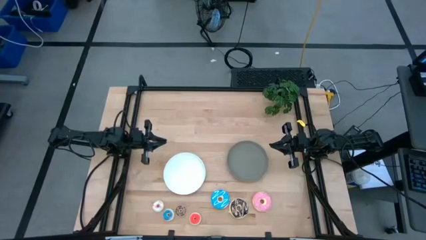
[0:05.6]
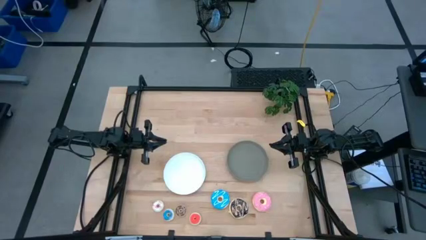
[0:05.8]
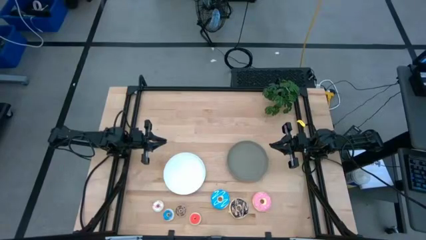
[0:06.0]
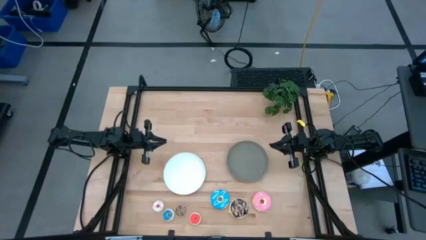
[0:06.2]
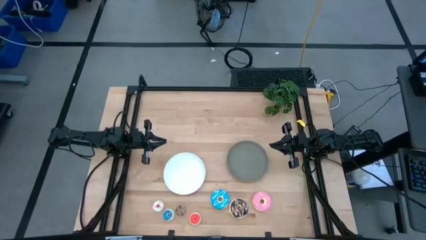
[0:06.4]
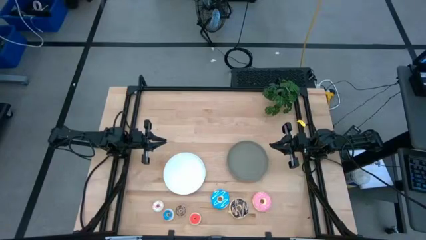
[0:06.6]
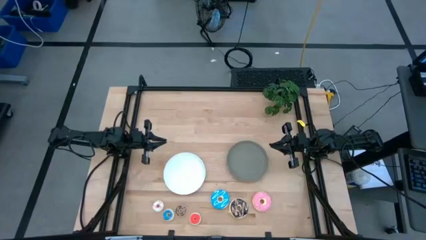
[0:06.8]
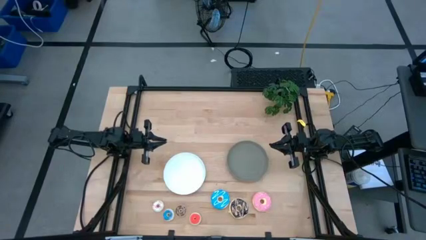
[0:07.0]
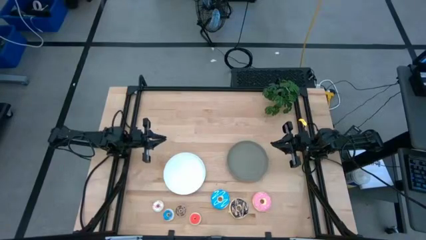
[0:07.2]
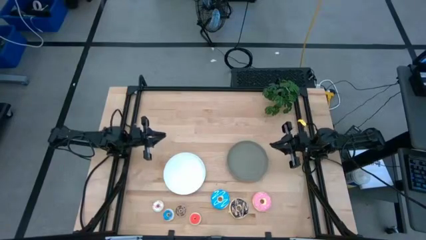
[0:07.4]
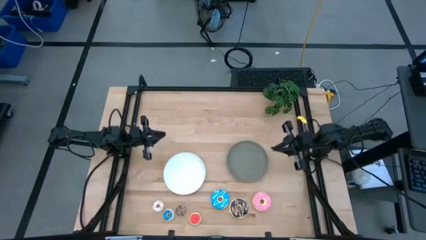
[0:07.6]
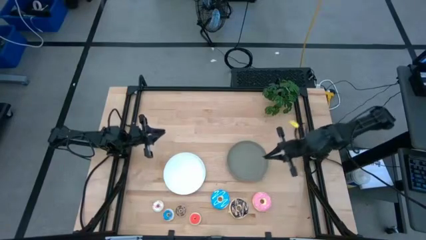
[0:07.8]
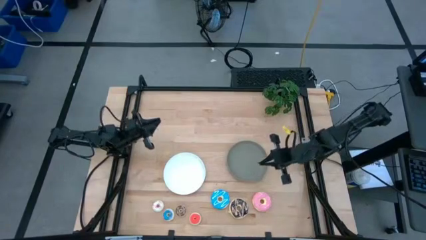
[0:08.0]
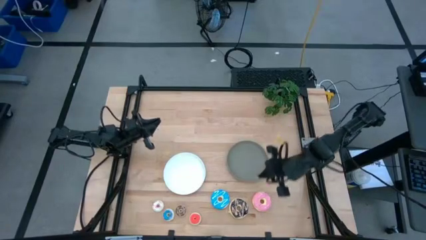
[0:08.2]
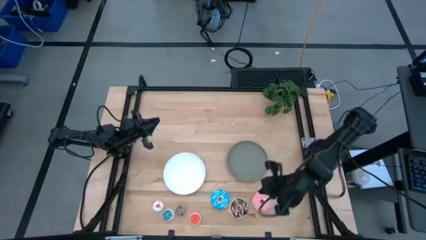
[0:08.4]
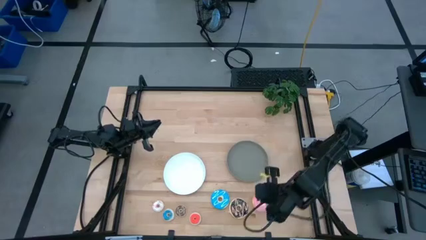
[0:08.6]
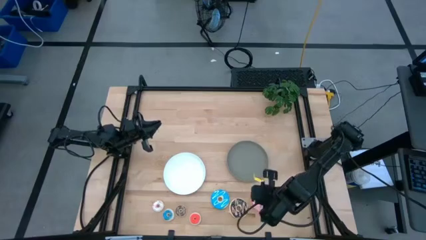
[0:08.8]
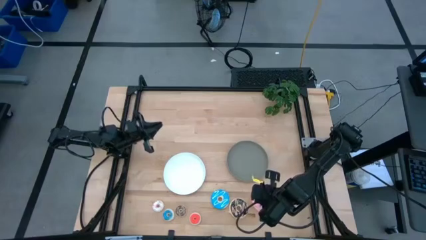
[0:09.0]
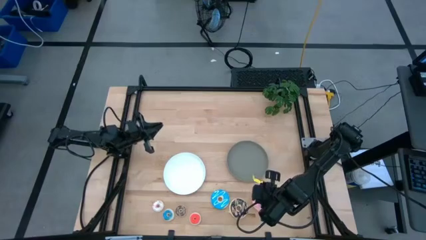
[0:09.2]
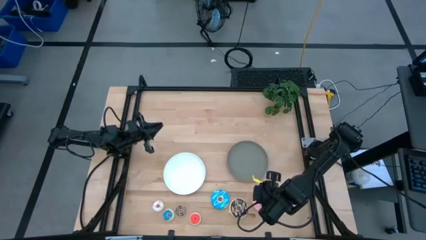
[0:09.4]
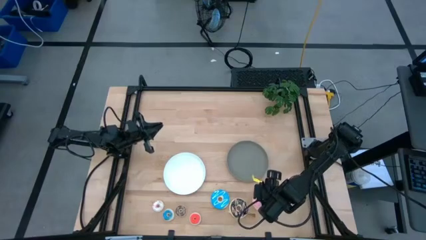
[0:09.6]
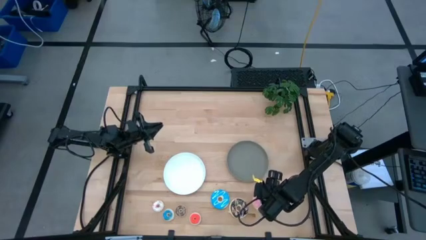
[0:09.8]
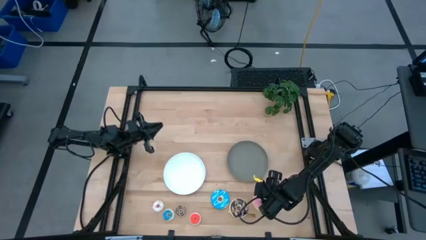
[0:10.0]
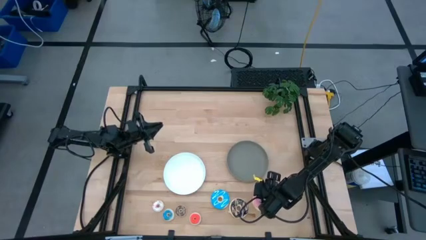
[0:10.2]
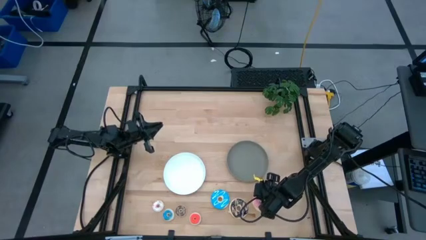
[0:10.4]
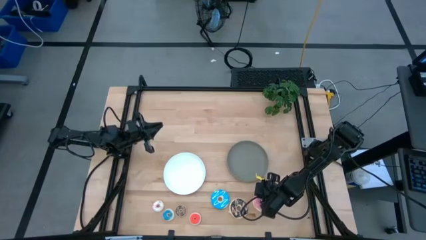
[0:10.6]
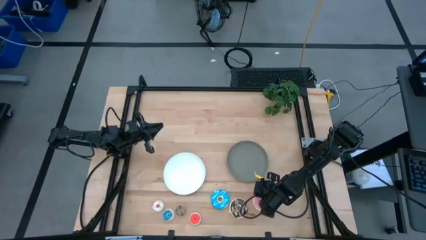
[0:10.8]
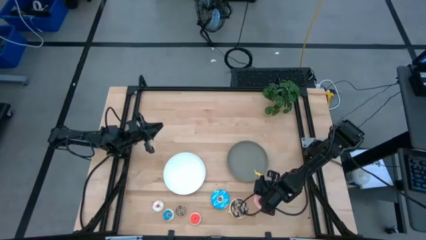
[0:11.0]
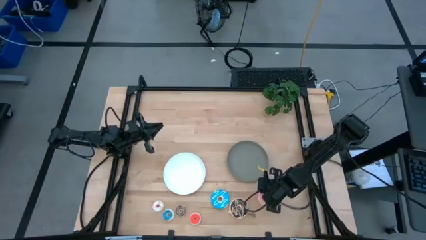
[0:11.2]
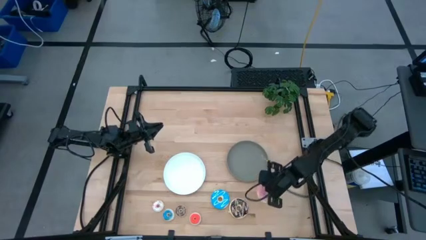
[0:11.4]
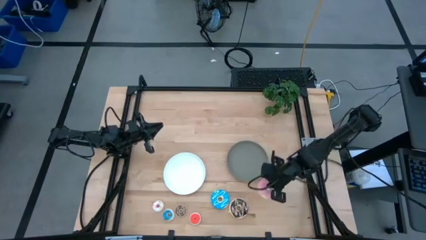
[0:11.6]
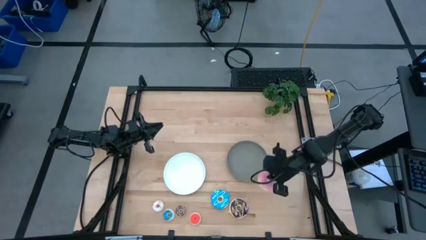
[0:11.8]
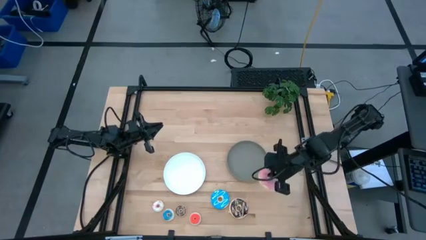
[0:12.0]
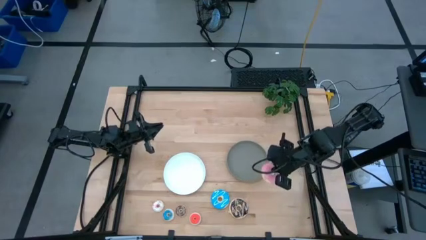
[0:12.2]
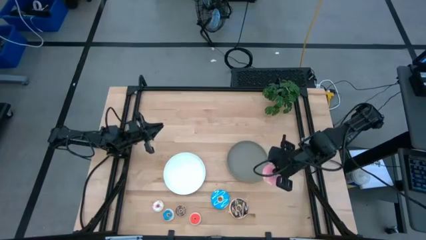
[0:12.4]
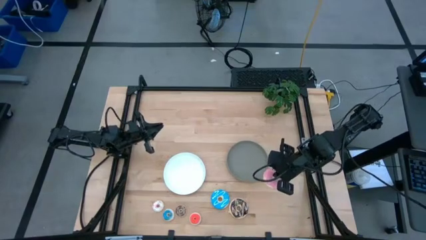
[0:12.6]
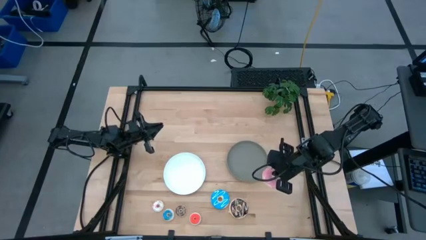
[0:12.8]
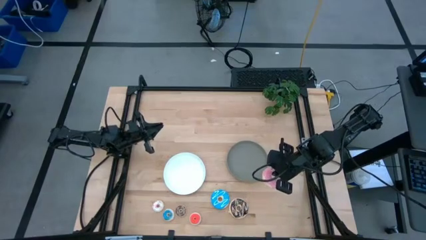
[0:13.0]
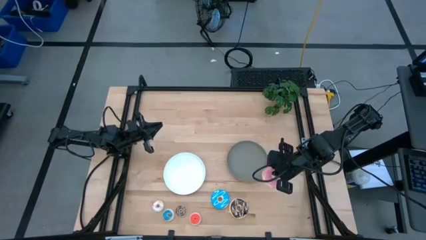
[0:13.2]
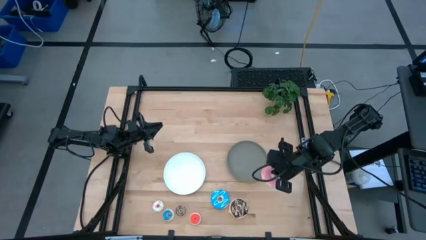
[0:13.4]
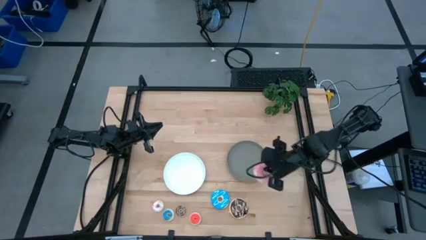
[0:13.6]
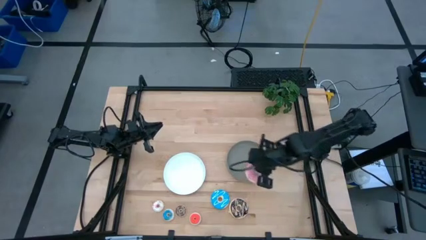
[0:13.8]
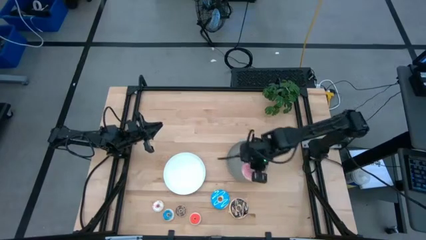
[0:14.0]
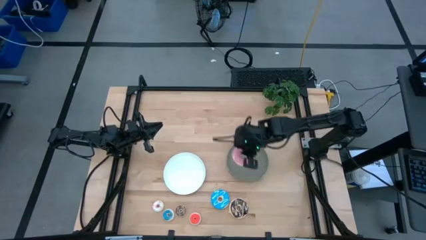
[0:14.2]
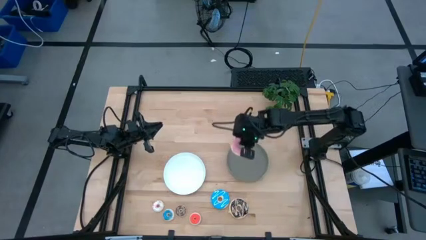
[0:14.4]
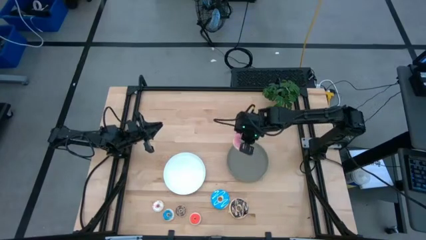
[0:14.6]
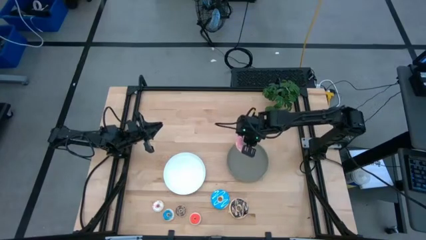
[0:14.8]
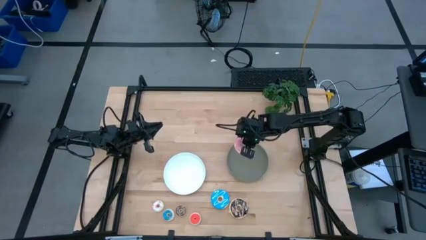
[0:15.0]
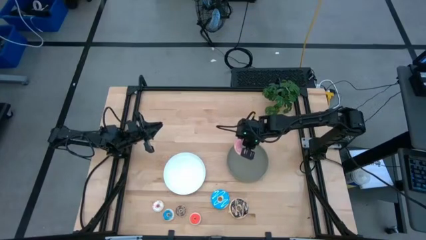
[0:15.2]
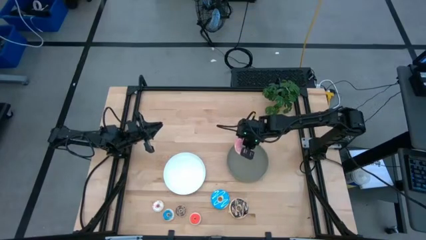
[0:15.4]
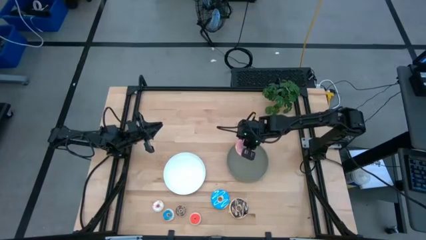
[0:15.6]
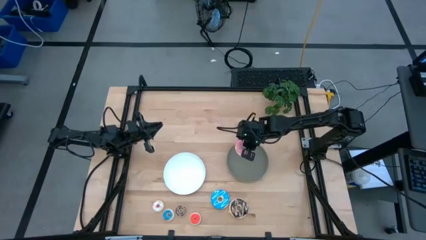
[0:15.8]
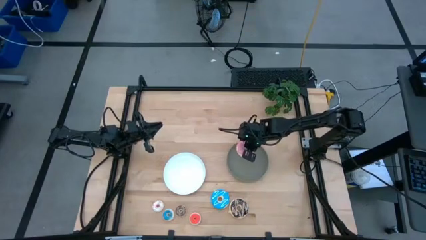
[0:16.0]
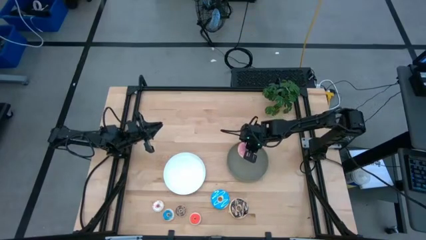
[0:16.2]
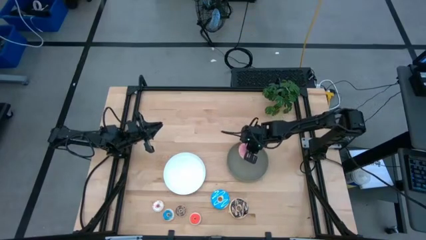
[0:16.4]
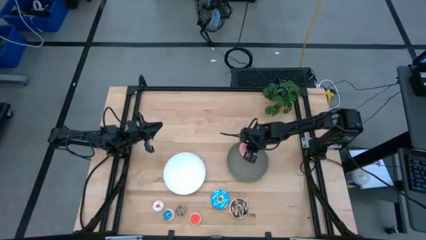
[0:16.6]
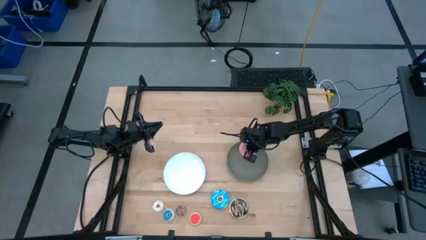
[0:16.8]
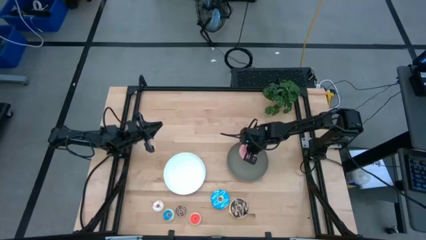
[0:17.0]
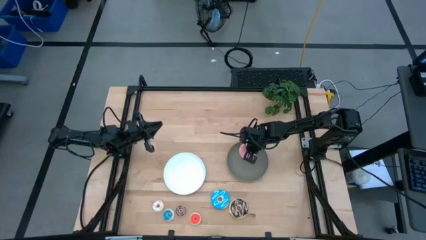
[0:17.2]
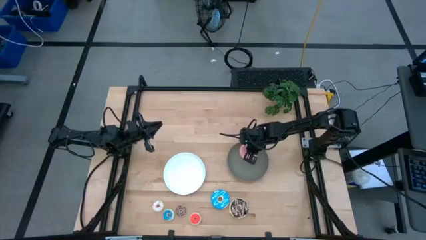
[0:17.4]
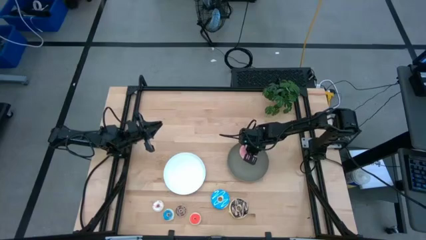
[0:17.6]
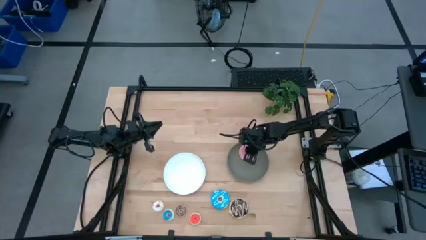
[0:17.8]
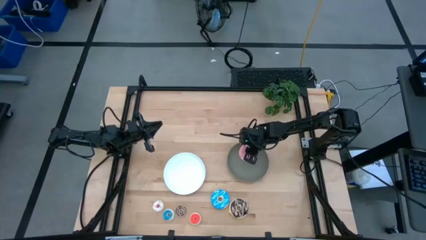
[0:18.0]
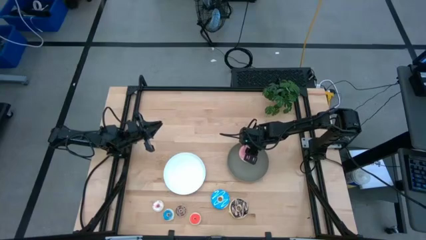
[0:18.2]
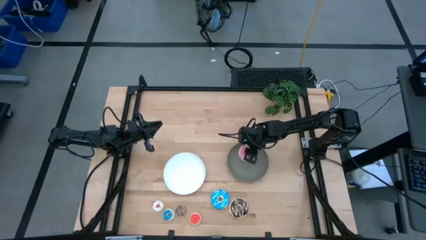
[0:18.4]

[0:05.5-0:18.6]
Task: Pick & Place donuts
Put the large pink donut on the gray plate
